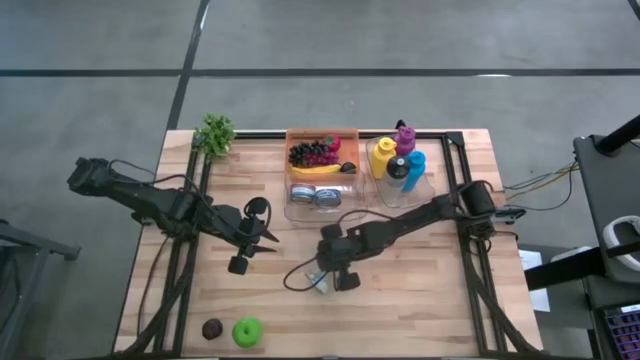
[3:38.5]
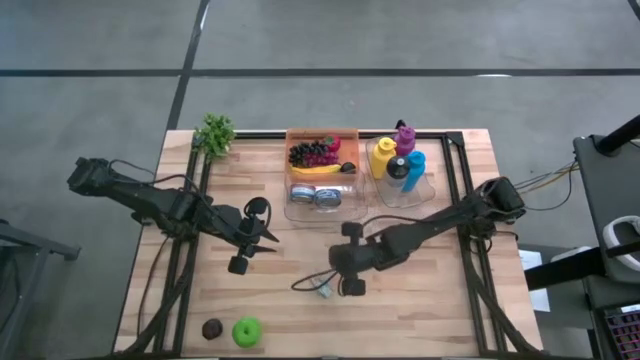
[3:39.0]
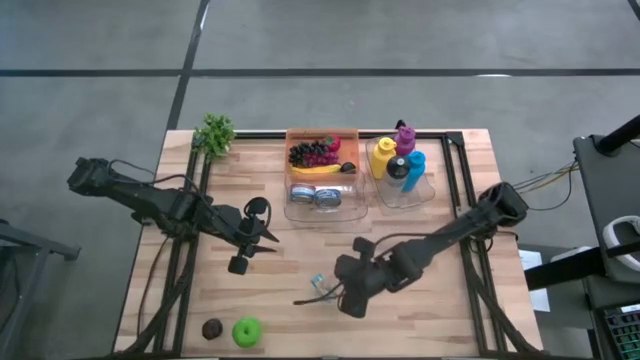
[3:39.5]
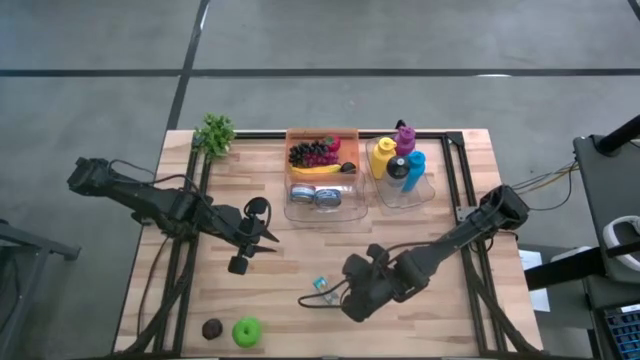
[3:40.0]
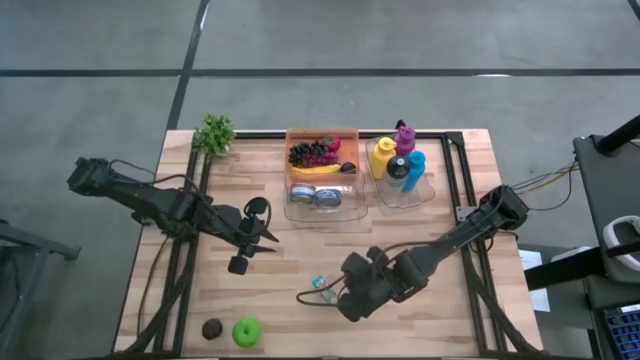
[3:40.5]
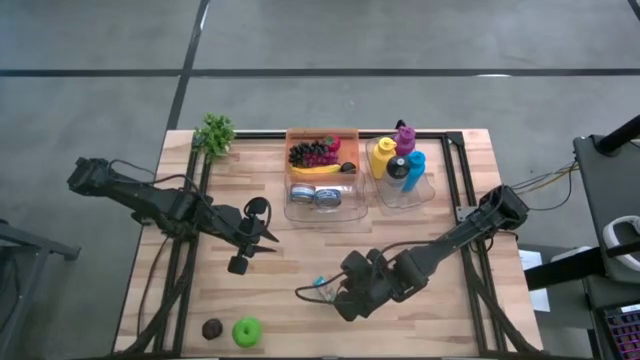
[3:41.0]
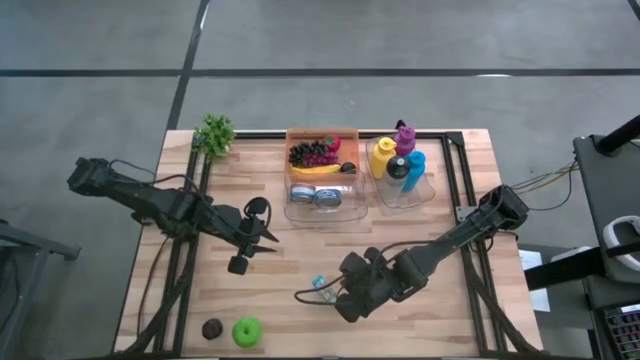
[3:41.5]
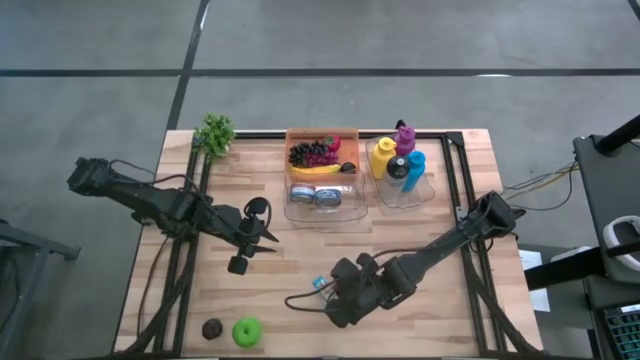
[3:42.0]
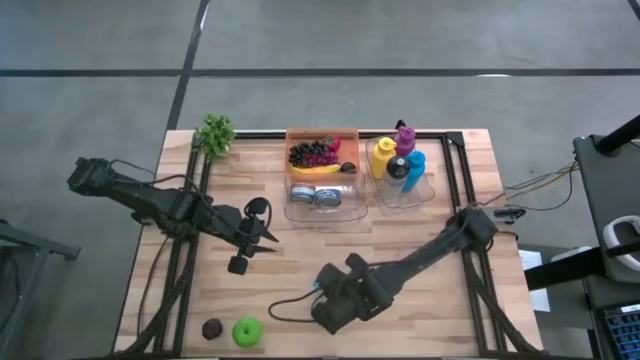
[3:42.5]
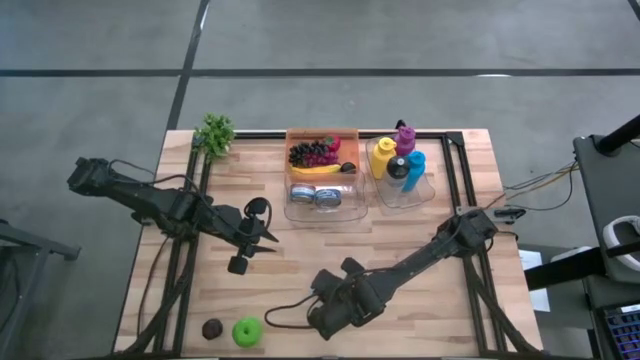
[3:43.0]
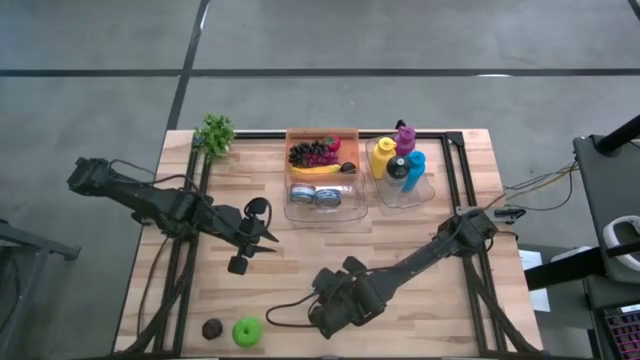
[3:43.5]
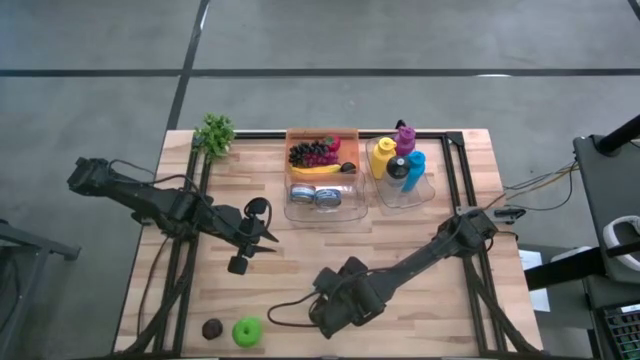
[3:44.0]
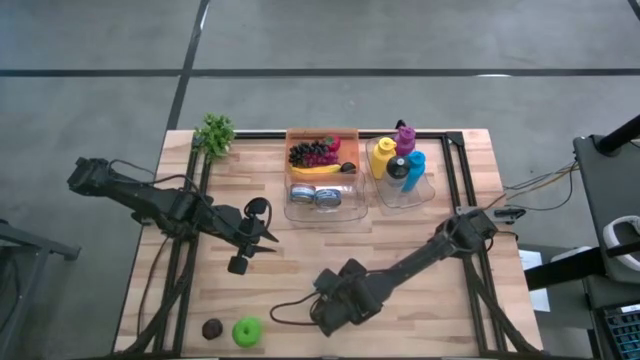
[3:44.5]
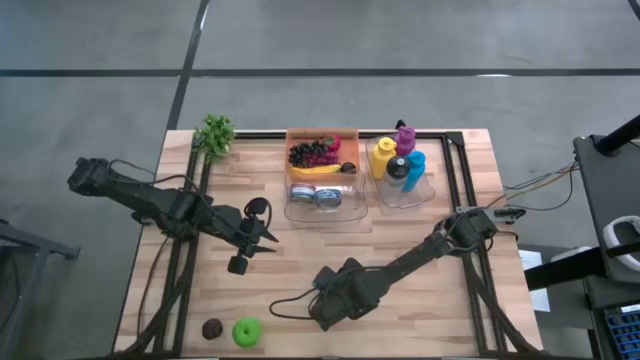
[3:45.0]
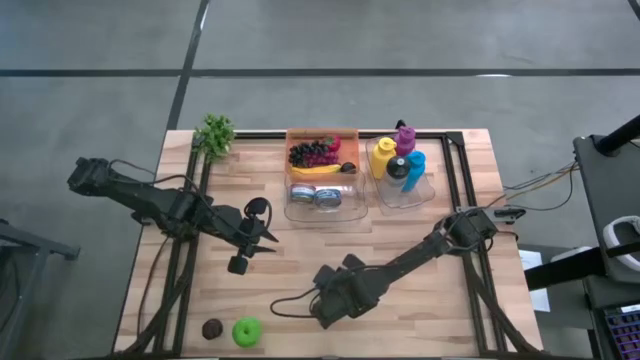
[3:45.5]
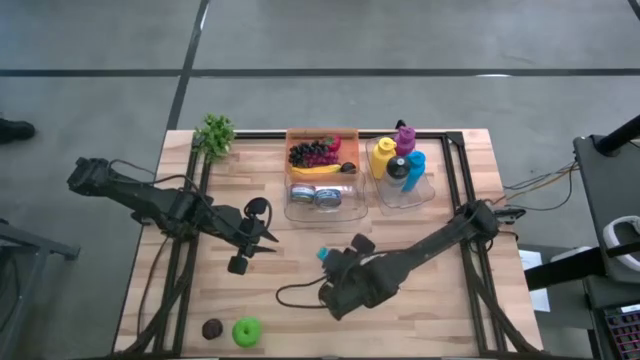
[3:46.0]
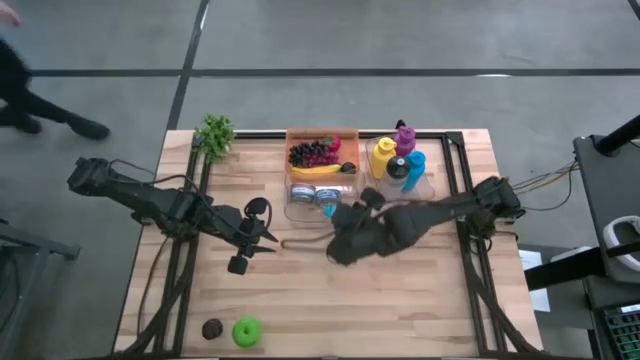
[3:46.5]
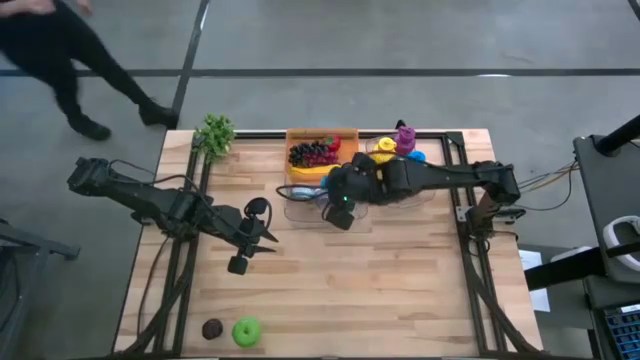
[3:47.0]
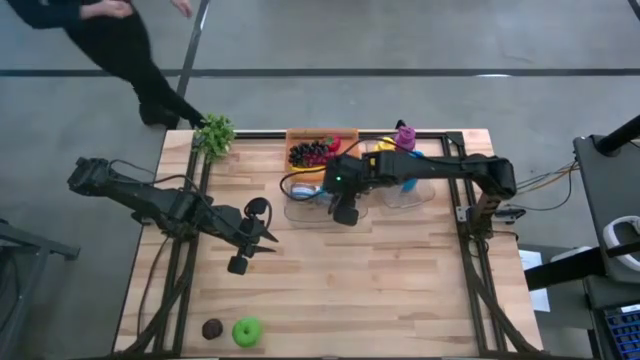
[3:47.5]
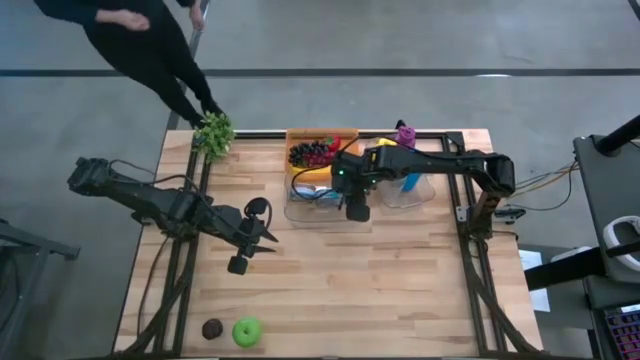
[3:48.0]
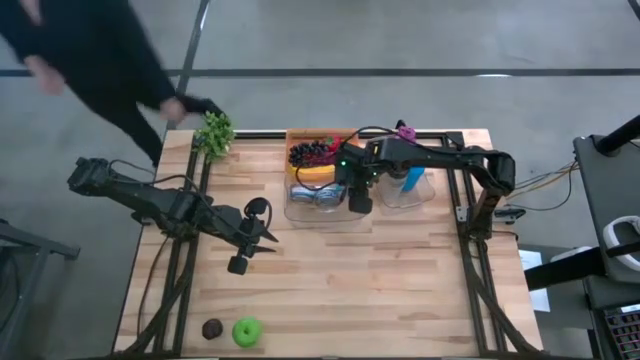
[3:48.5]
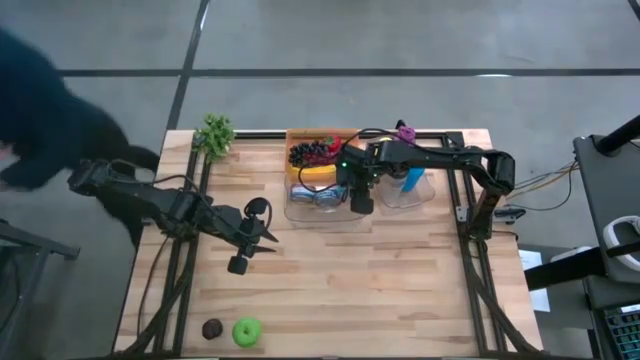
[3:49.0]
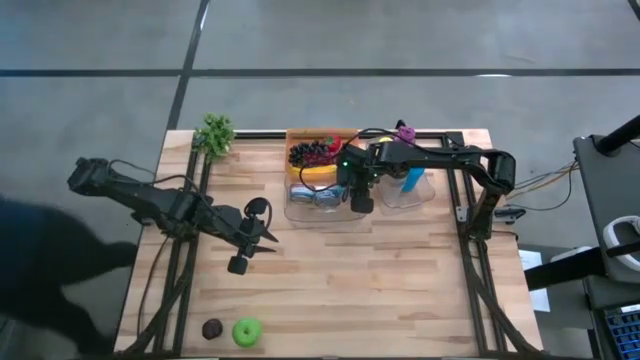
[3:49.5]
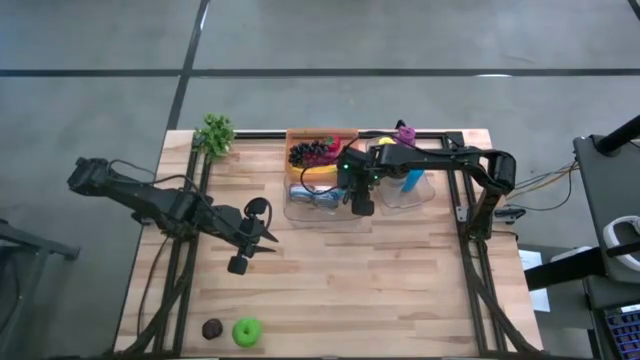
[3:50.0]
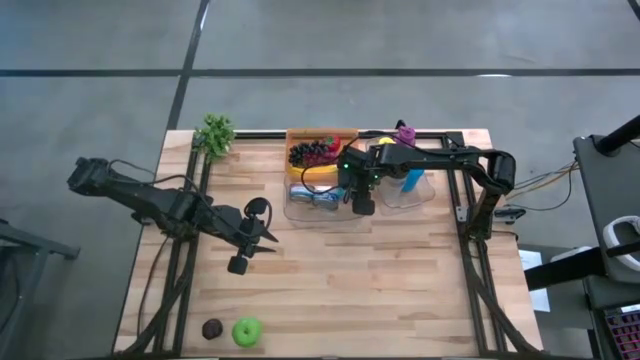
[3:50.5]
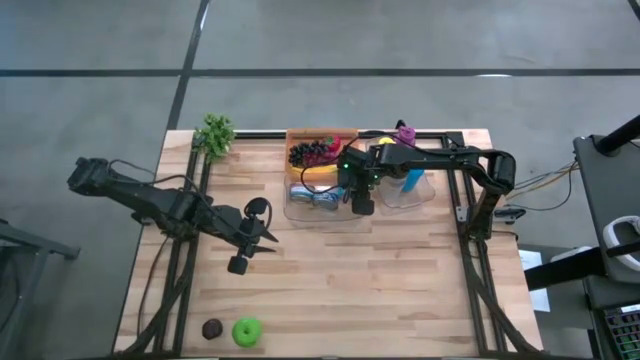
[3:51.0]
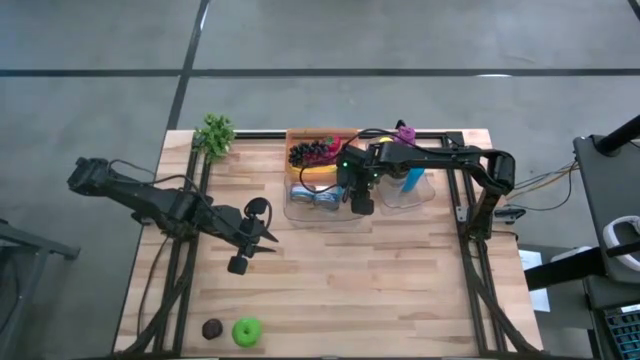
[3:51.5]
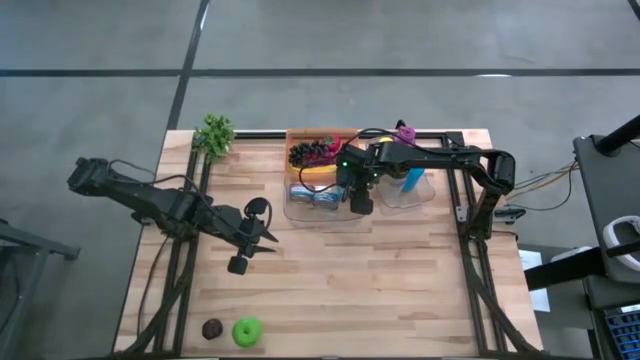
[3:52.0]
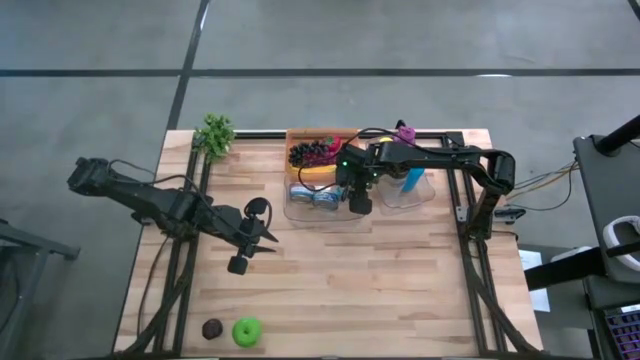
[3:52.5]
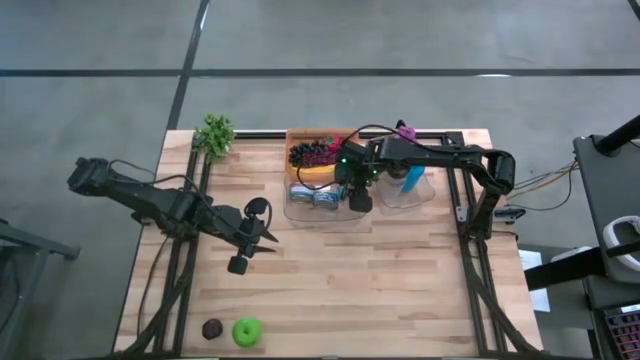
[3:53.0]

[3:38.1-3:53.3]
Task: Pick & Place Food Item
Put the yellow and blue can into the left transparent bin

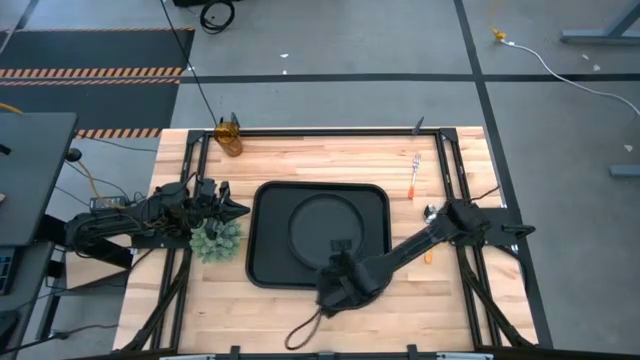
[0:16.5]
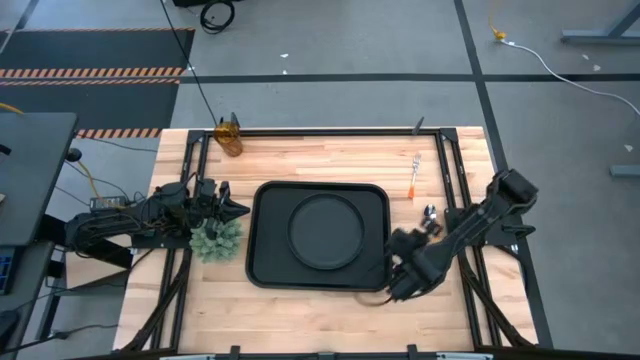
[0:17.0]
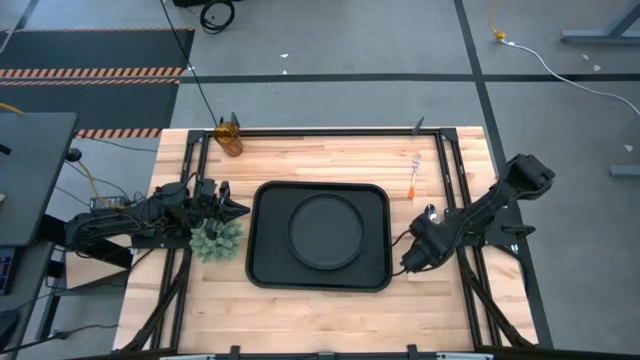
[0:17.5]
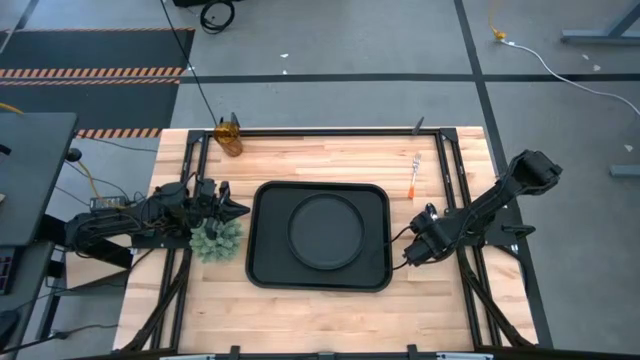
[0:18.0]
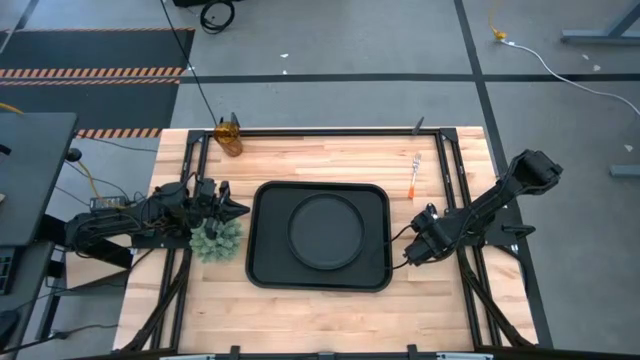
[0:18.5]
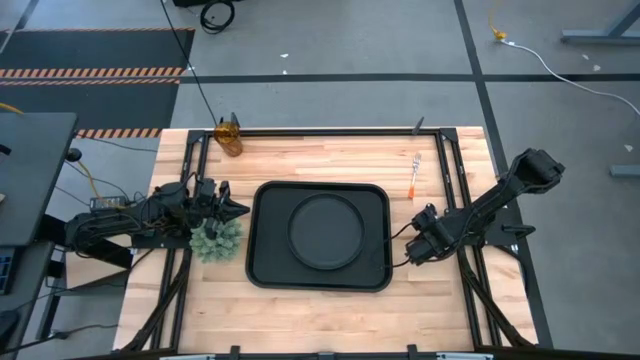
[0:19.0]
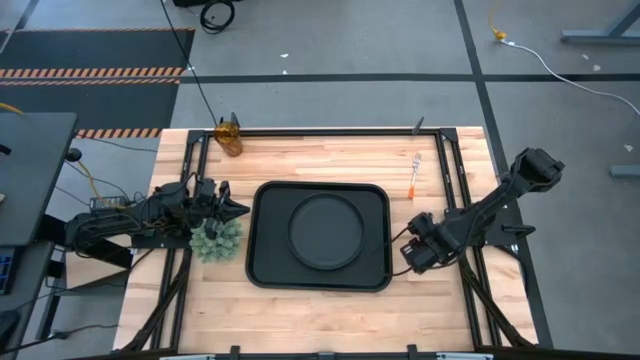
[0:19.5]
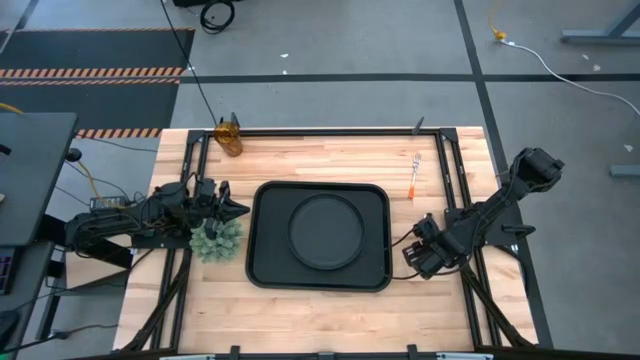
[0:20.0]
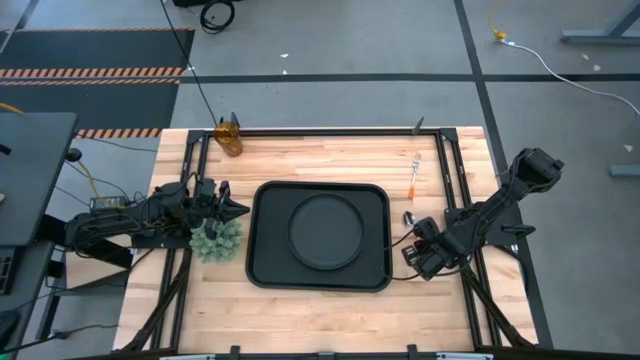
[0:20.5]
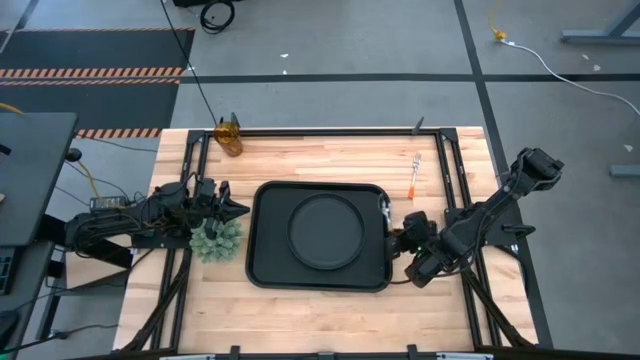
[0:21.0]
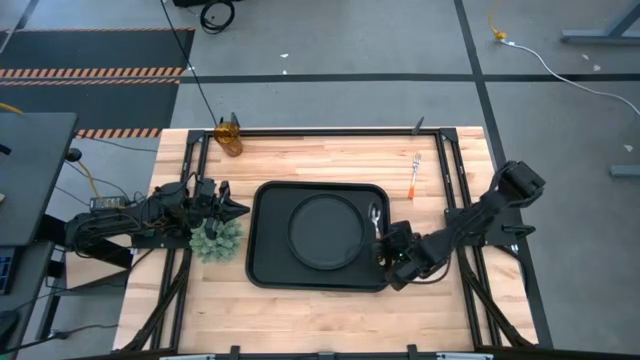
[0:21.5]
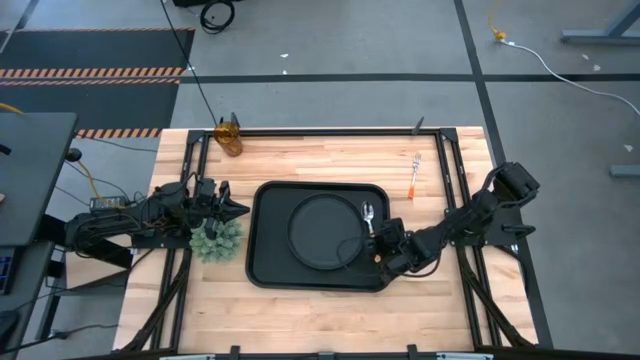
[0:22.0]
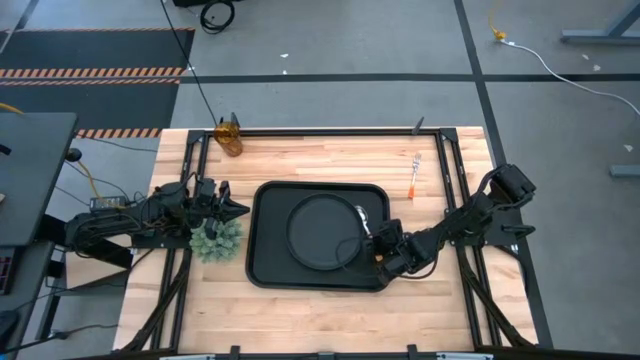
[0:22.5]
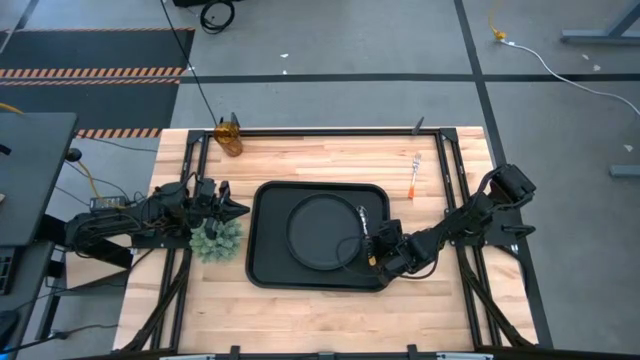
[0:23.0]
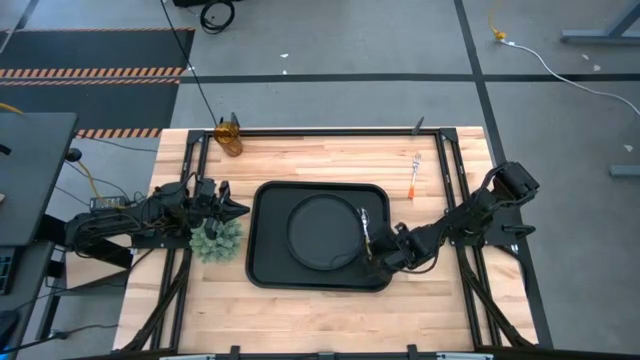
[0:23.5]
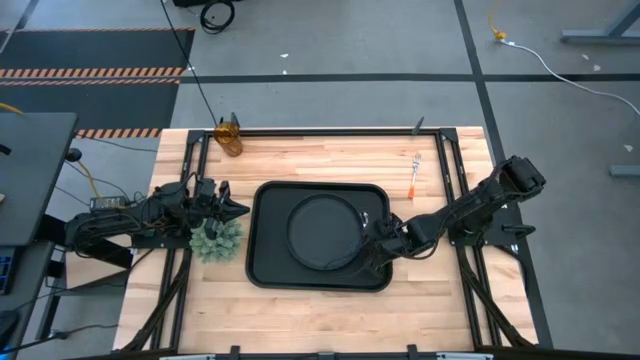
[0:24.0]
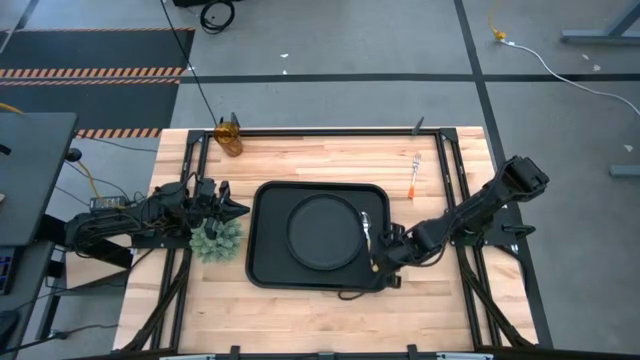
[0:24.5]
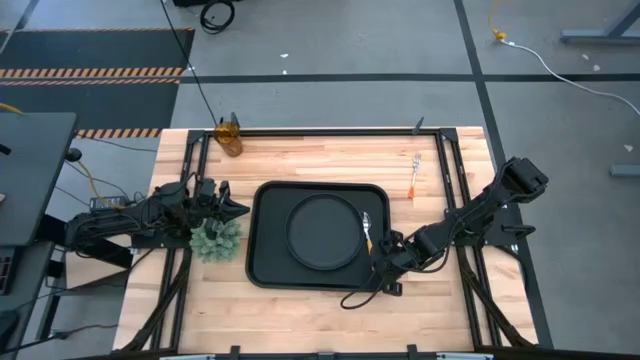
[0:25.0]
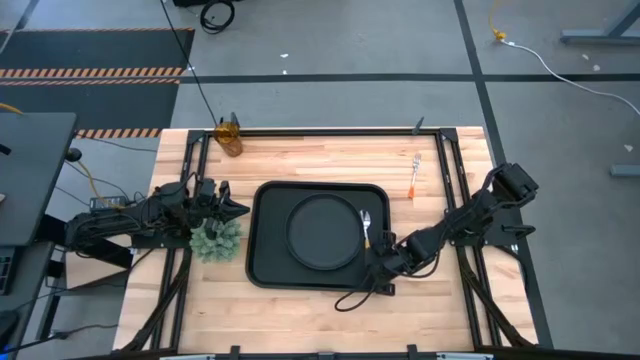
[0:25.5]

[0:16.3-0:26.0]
Task: Pick and place plate/cup/fork/spoon on tray
Put the yellow spoon on the black serving tray to the right of the black plate
